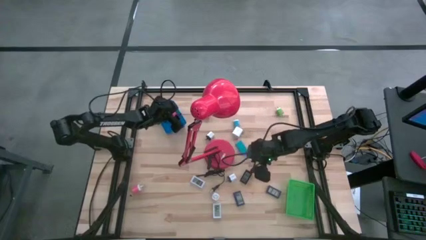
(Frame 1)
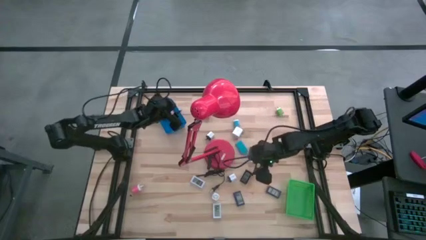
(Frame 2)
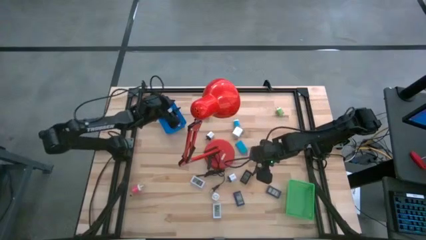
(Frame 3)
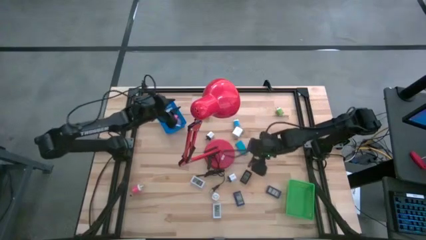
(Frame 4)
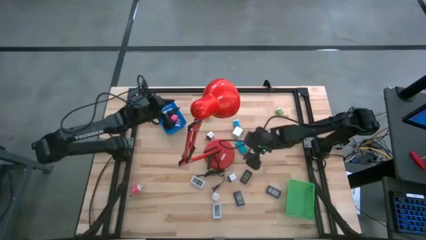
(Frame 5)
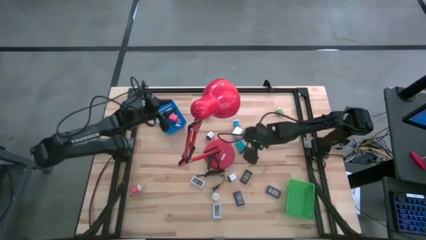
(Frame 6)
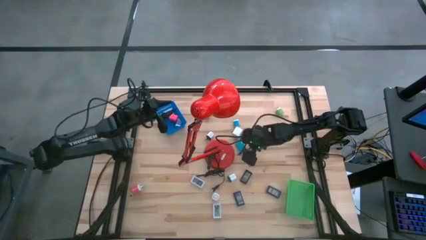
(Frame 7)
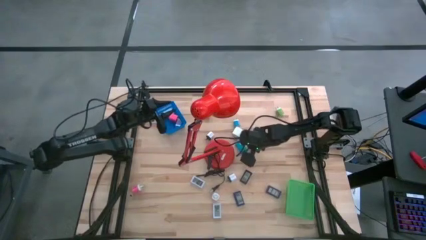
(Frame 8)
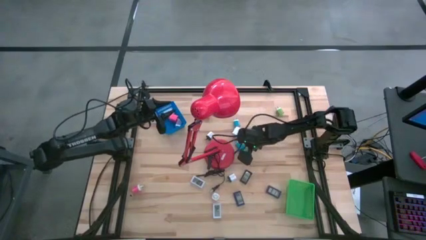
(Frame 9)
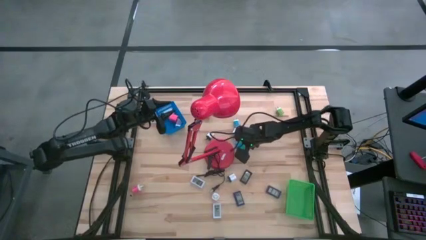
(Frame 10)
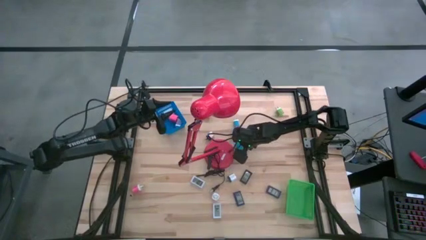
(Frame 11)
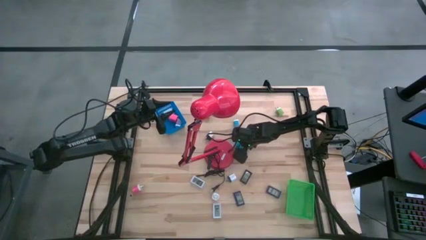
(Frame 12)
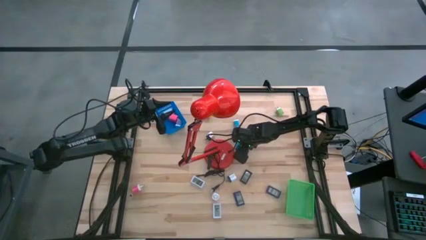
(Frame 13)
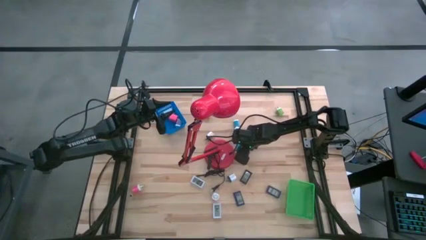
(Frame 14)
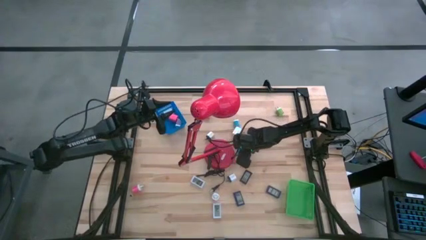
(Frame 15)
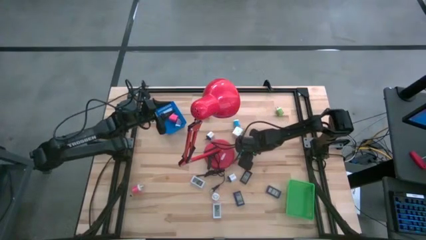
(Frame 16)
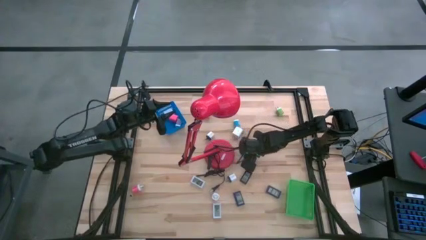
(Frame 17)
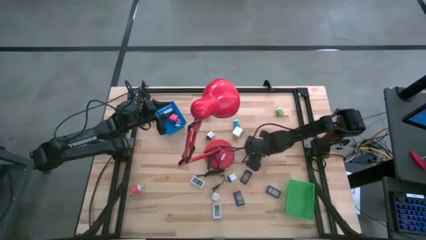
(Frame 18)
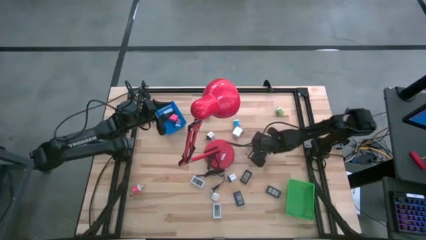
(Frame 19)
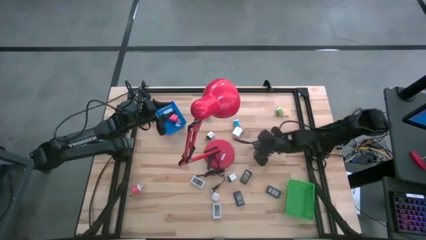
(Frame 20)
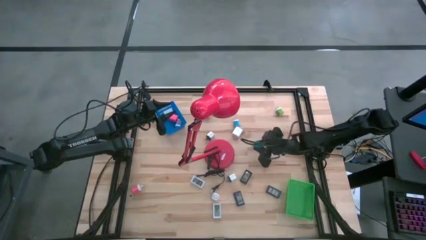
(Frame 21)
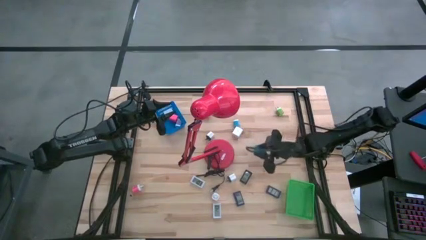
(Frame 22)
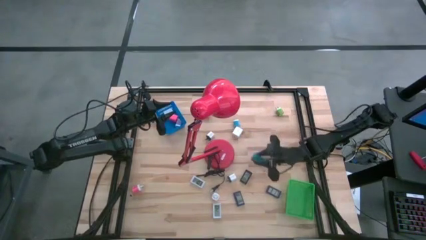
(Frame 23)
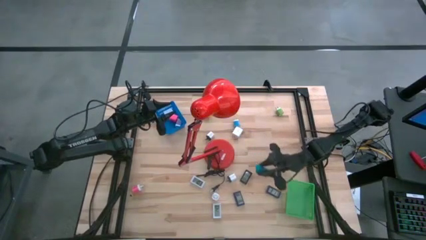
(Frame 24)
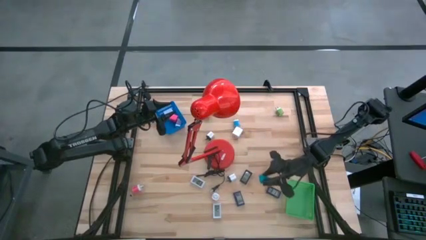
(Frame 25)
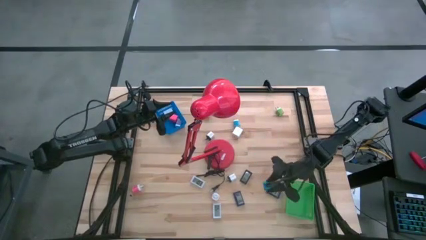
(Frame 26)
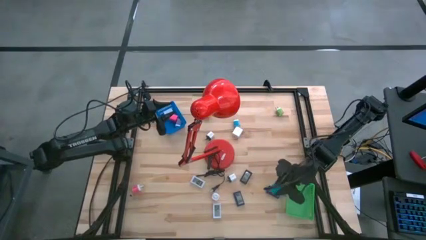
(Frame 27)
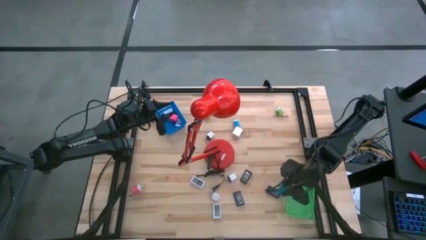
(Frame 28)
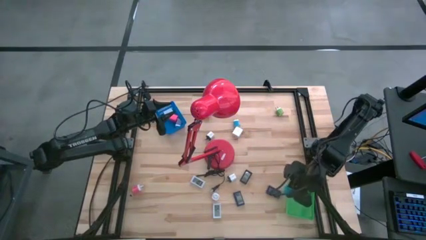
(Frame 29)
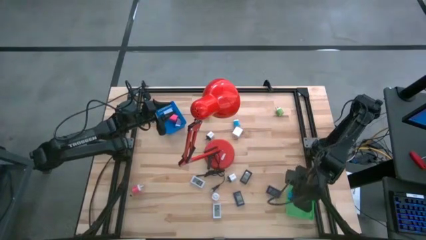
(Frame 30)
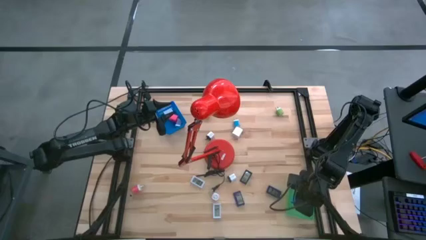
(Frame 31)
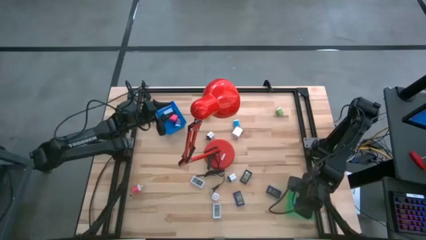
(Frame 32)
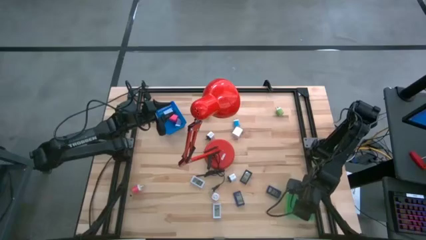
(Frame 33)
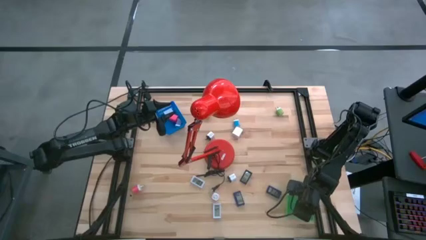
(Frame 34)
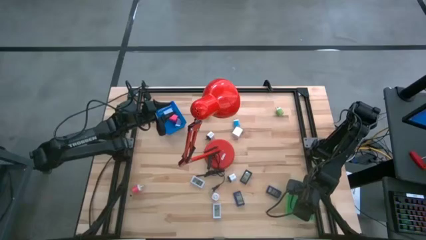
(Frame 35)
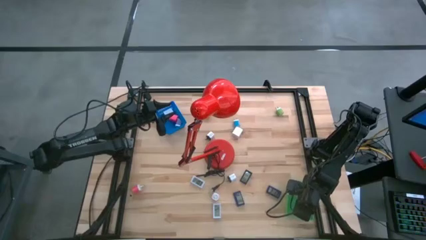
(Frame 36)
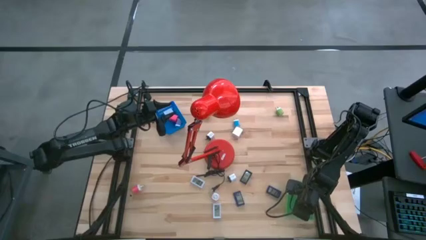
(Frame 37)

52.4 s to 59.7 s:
Task: Pick & Place Office items
Put the light blue digital clock into the green bin

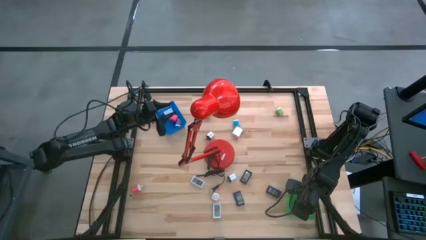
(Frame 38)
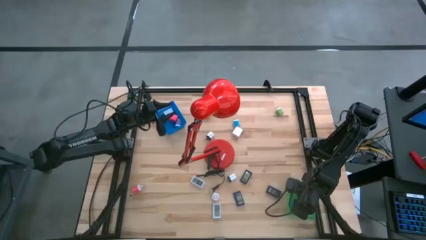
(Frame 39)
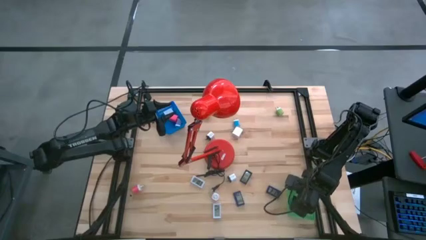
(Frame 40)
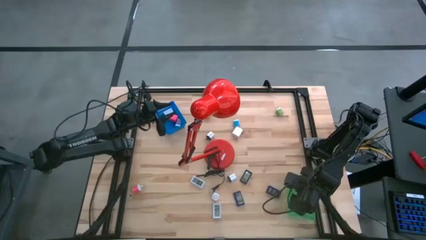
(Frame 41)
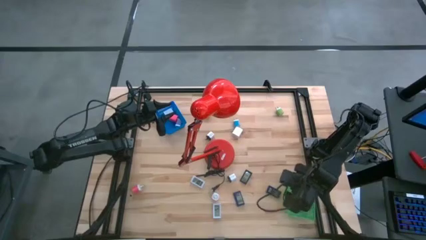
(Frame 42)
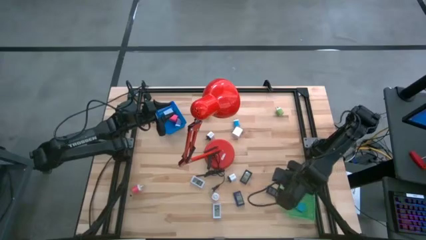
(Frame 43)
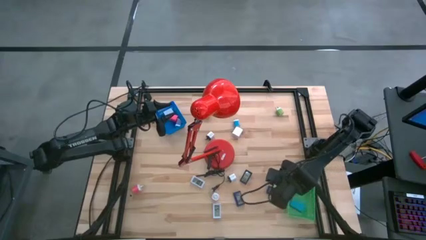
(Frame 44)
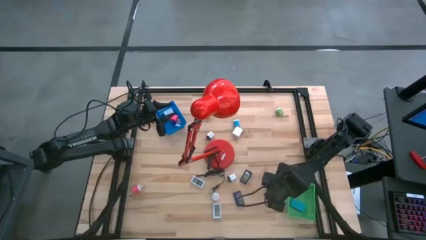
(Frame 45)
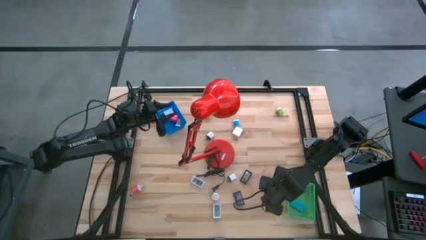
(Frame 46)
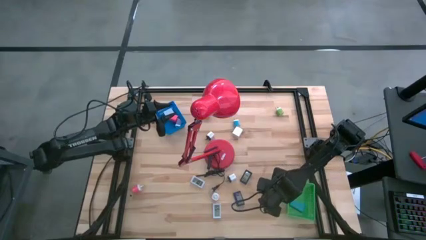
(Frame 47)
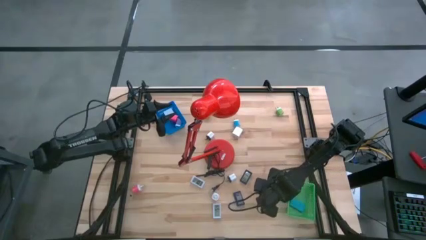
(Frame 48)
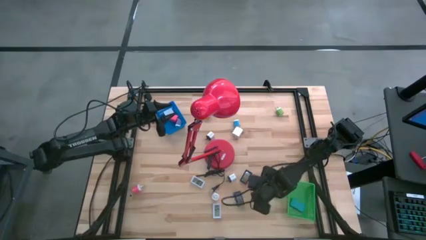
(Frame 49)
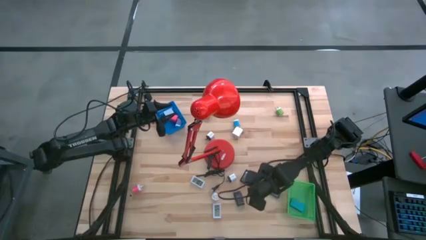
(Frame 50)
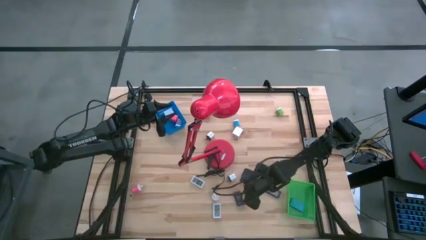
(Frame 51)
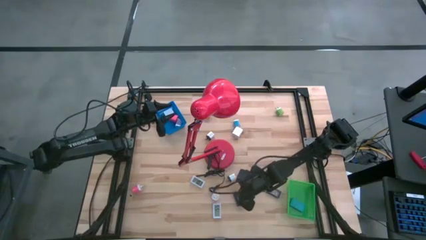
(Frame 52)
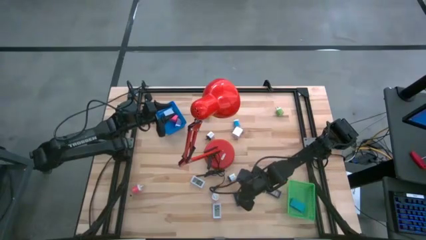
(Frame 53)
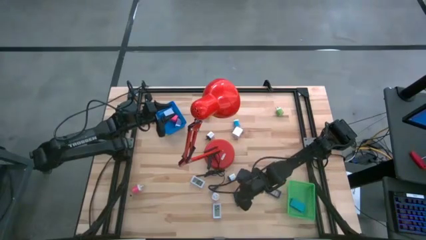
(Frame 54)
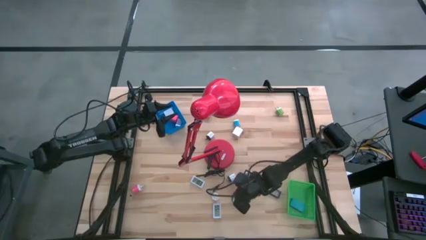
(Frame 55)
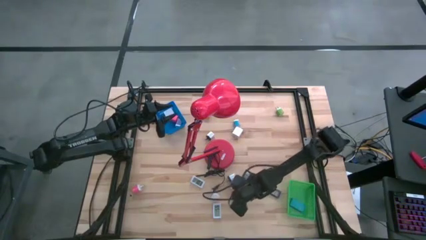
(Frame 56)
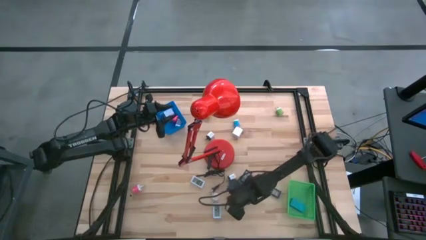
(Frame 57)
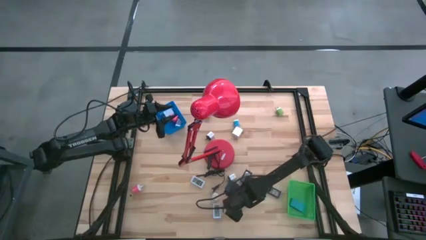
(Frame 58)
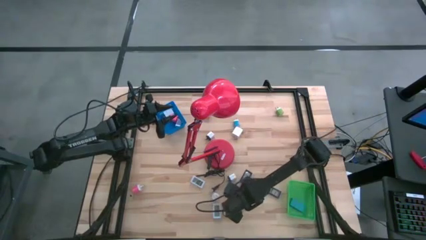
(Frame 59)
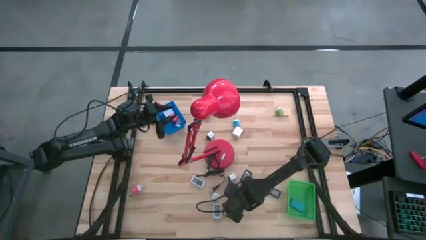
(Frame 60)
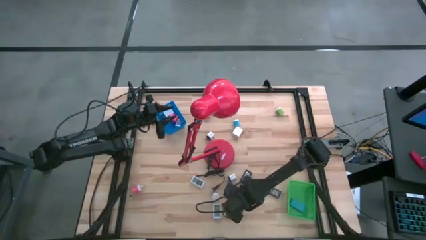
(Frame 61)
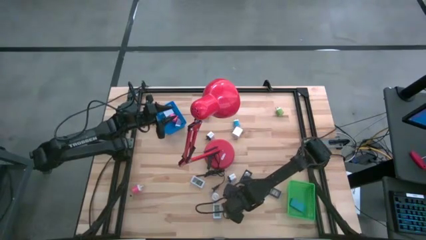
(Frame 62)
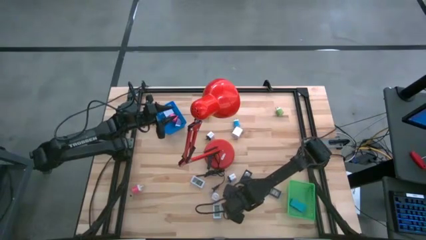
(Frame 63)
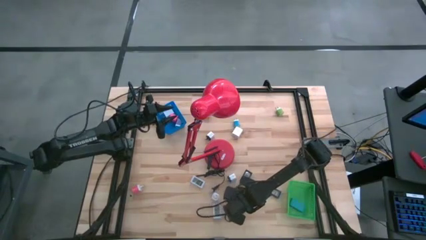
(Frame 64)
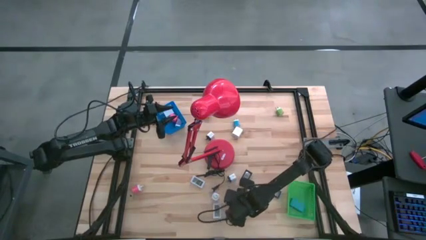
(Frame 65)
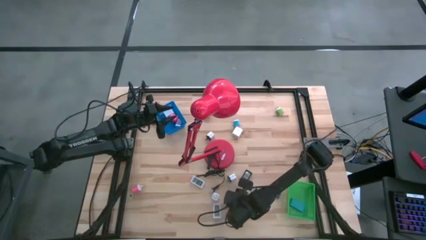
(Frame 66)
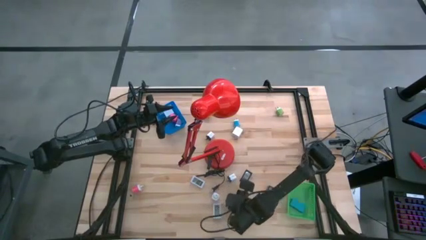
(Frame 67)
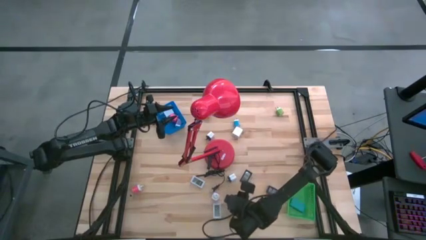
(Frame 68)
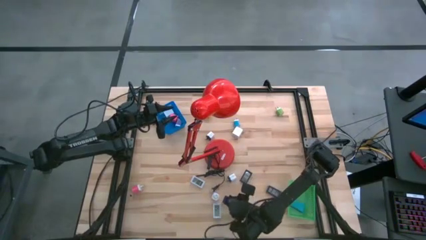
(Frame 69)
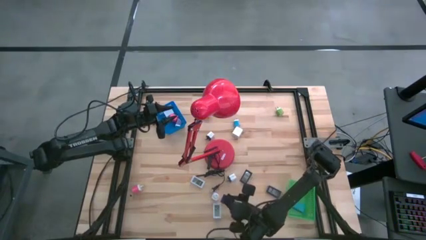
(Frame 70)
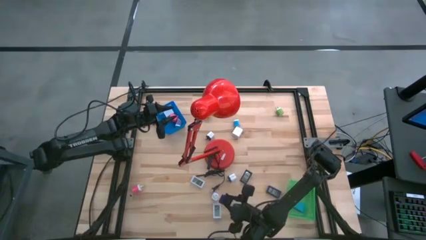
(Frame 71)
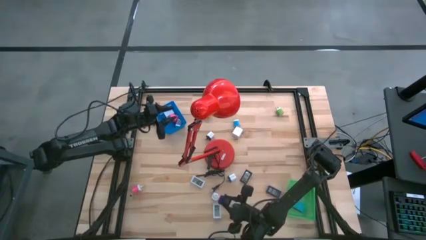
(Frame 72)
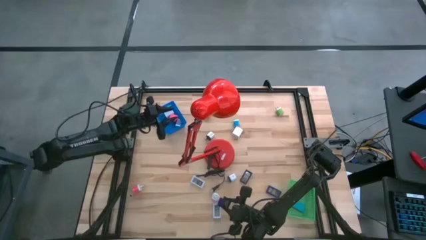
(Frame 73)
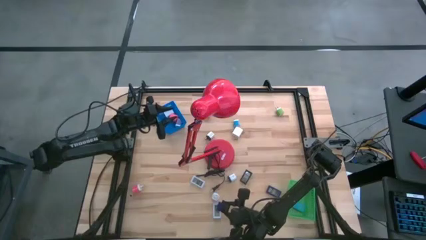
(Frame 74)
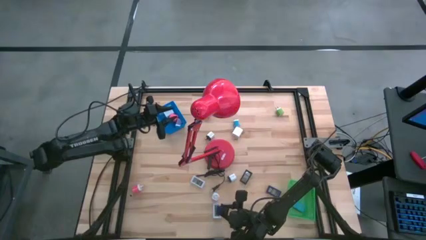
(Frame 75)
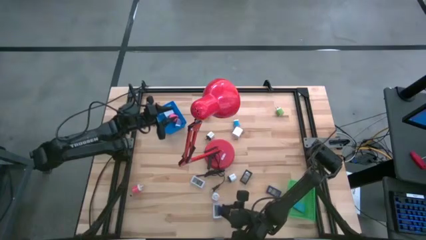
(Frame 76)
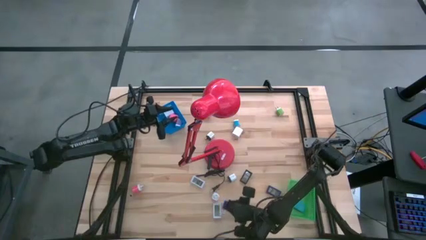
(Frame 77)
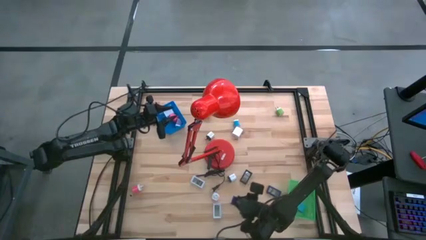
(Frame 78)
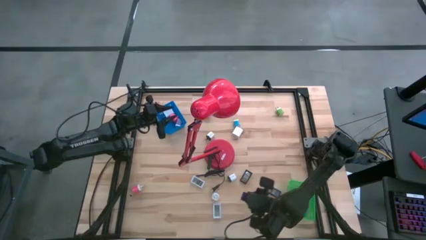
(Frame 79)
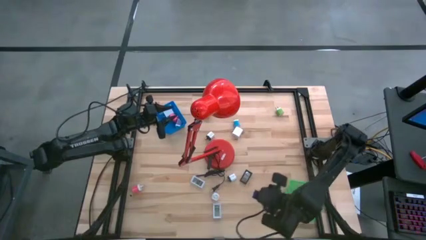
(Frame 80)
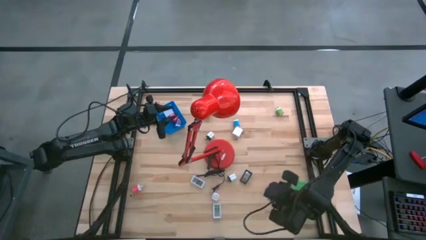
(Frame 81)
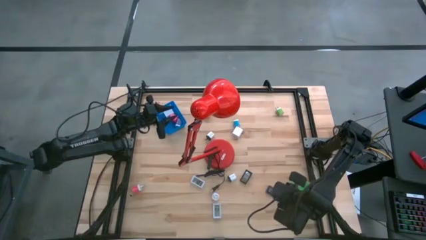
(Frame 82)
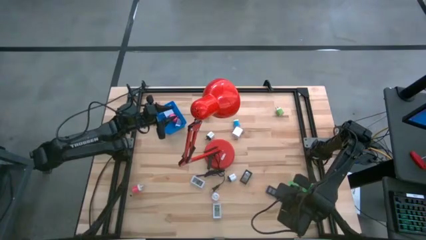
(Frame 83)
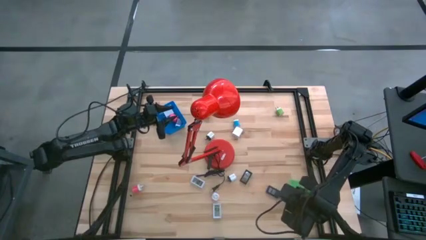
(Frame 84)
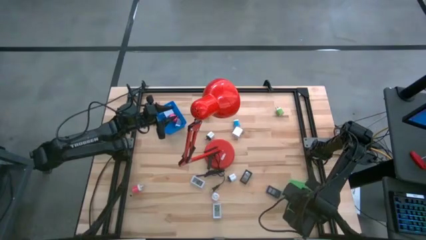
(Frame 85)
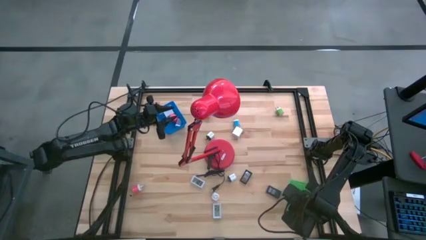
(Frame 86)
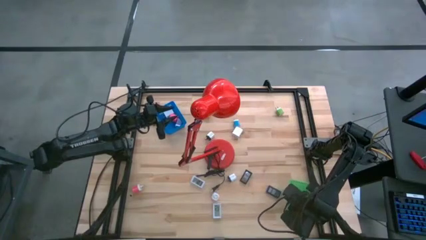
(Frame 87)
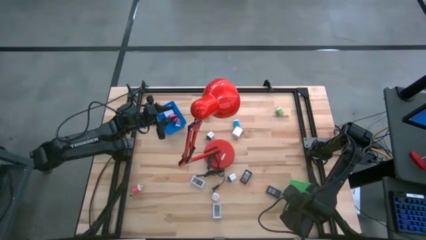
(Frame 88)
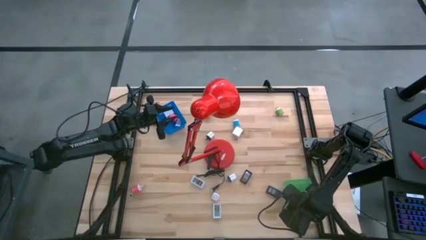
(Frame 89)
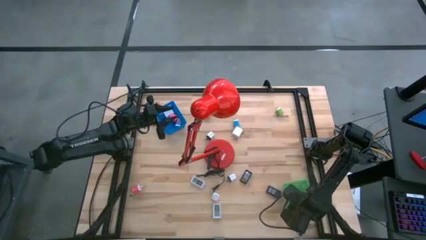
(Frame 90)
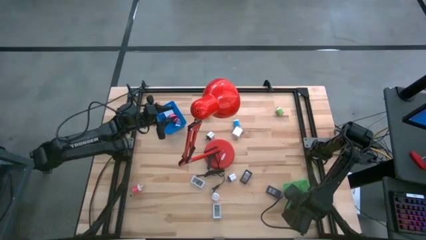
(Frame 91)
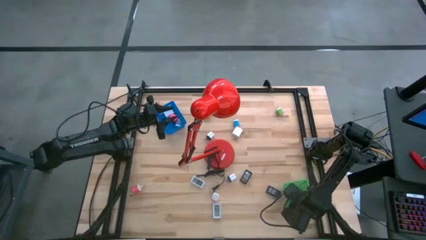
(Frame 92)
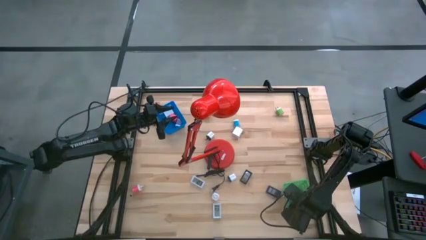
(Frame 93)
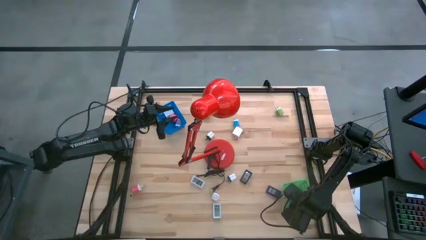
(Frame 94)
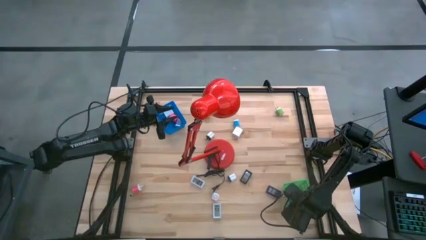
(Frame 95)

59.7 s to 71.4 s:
Put the left blue digital clock into the green bin
